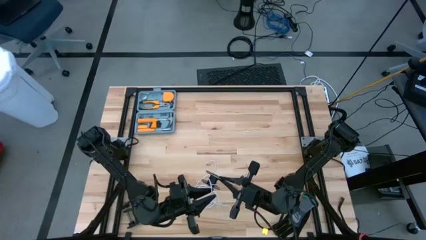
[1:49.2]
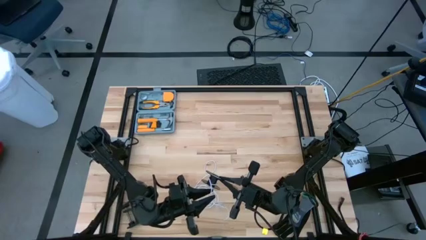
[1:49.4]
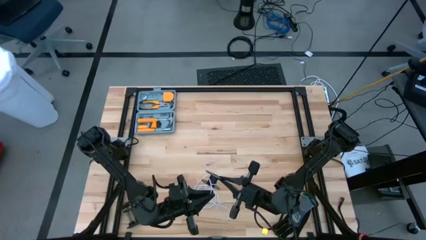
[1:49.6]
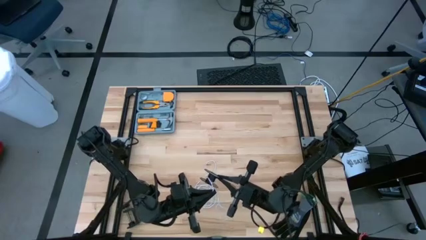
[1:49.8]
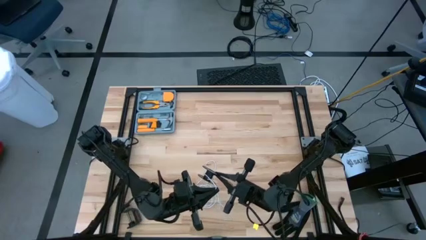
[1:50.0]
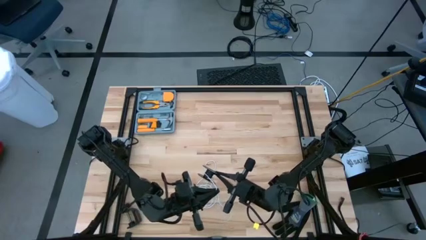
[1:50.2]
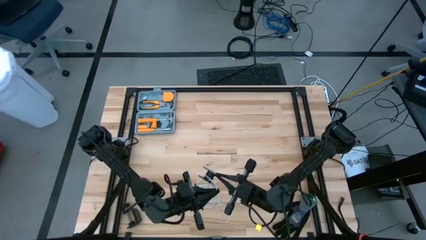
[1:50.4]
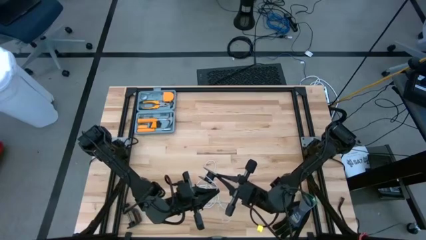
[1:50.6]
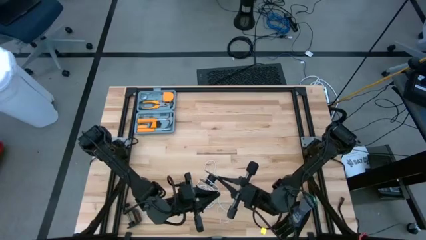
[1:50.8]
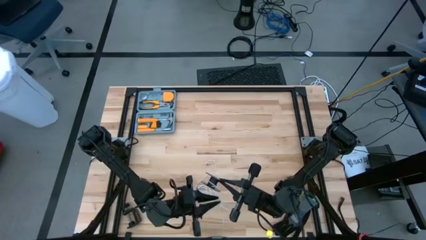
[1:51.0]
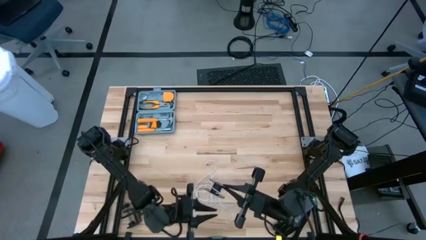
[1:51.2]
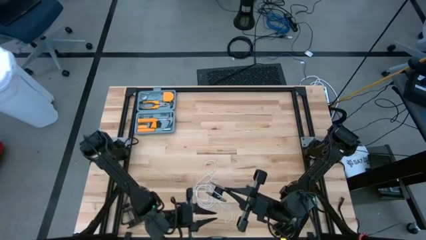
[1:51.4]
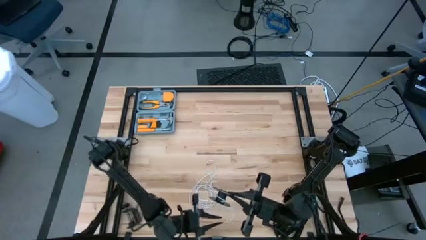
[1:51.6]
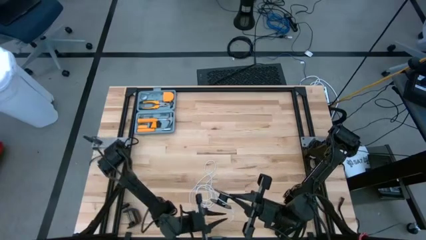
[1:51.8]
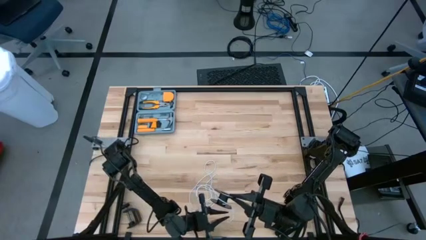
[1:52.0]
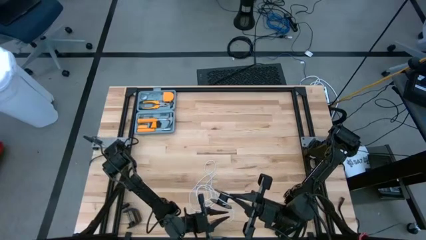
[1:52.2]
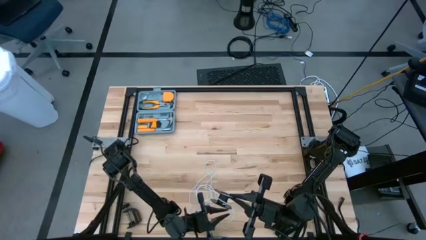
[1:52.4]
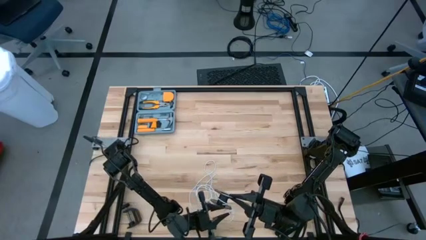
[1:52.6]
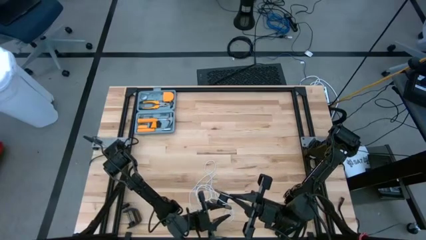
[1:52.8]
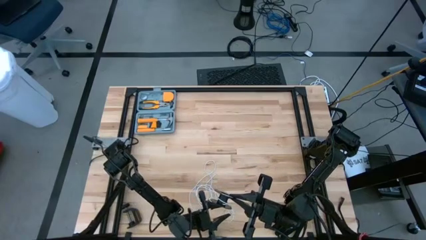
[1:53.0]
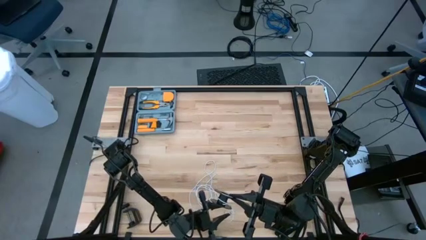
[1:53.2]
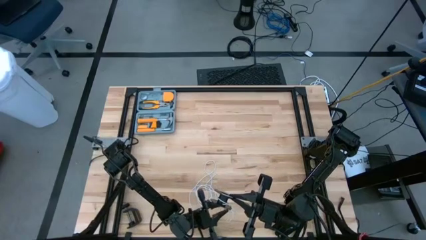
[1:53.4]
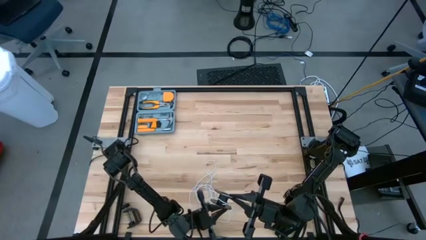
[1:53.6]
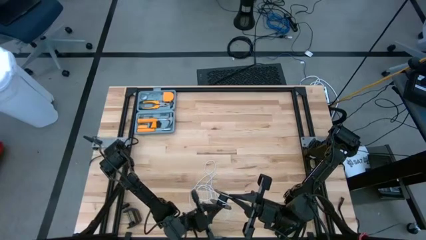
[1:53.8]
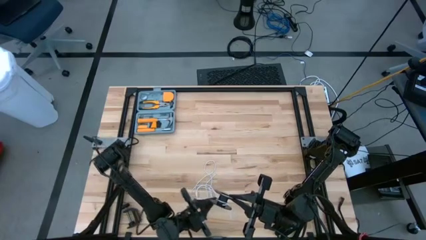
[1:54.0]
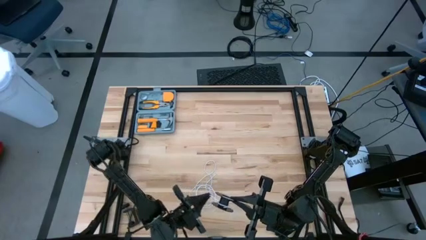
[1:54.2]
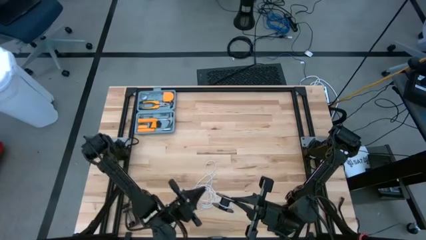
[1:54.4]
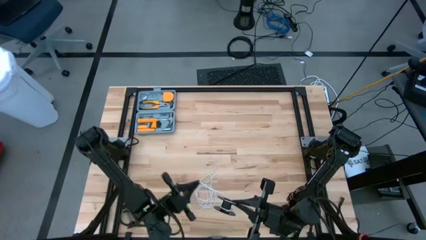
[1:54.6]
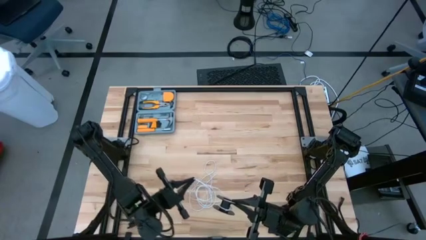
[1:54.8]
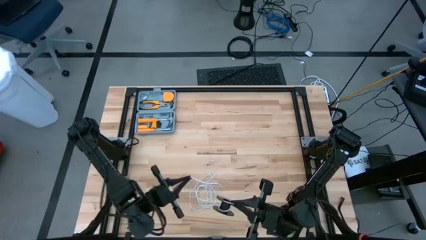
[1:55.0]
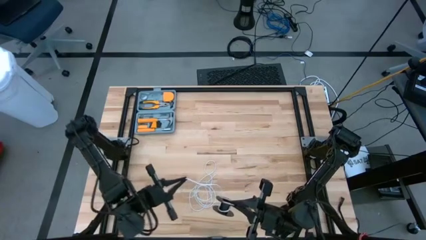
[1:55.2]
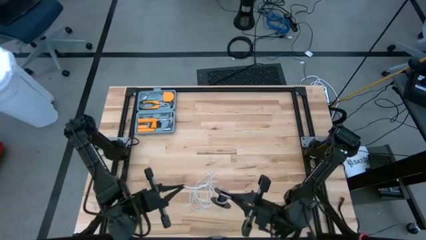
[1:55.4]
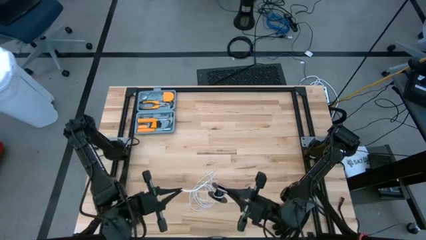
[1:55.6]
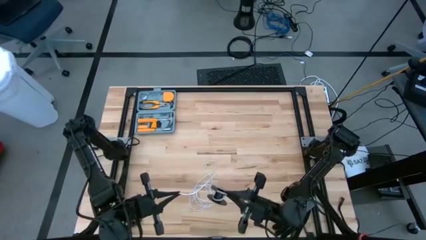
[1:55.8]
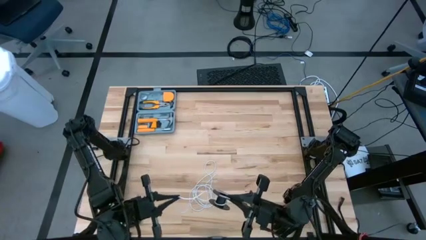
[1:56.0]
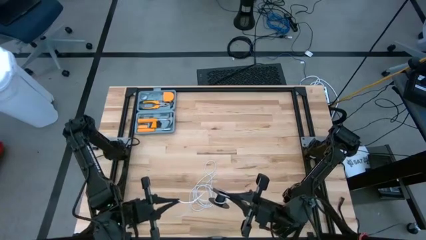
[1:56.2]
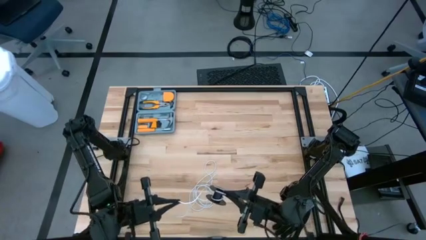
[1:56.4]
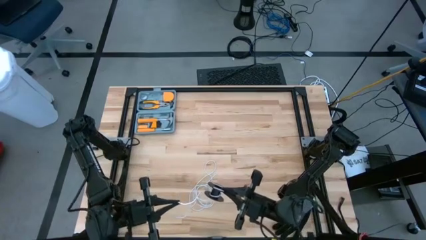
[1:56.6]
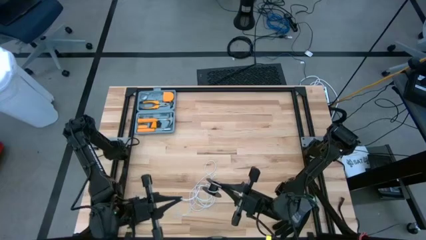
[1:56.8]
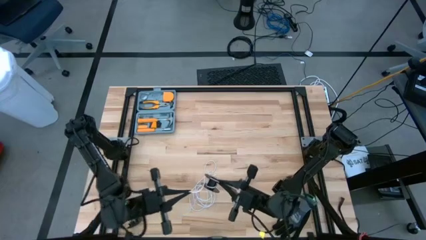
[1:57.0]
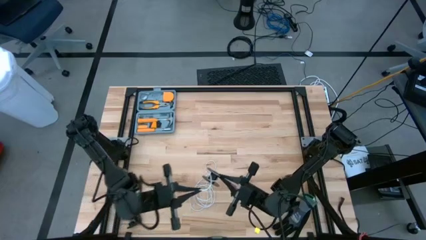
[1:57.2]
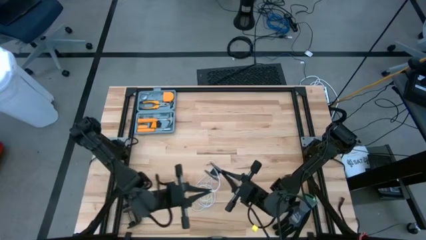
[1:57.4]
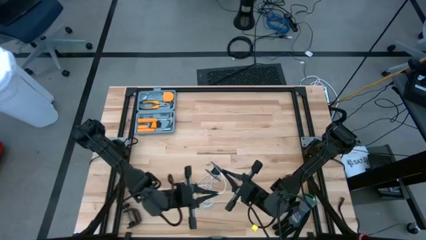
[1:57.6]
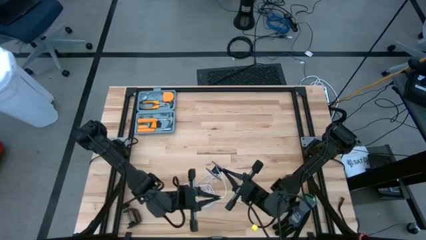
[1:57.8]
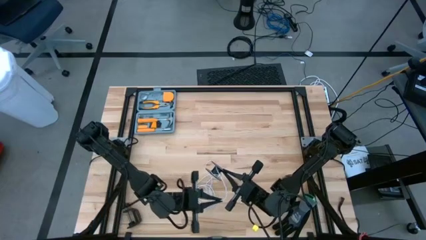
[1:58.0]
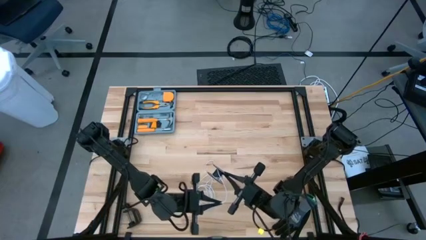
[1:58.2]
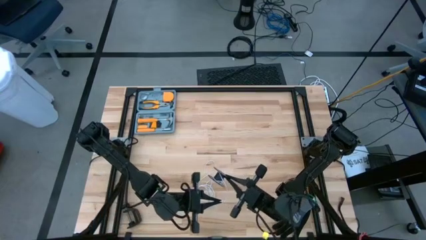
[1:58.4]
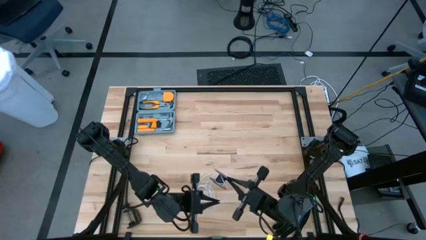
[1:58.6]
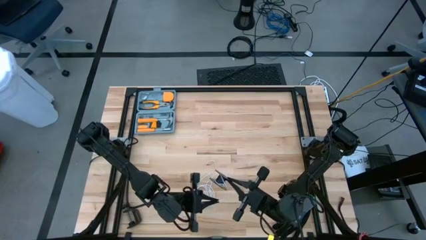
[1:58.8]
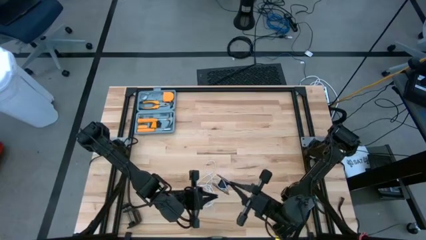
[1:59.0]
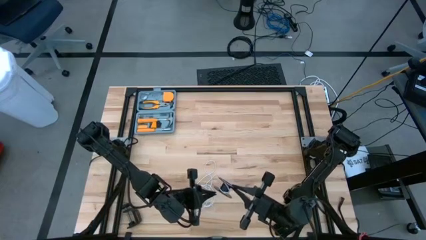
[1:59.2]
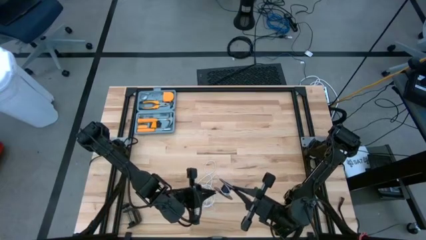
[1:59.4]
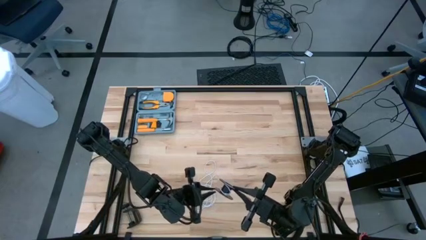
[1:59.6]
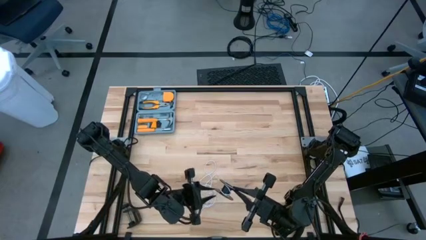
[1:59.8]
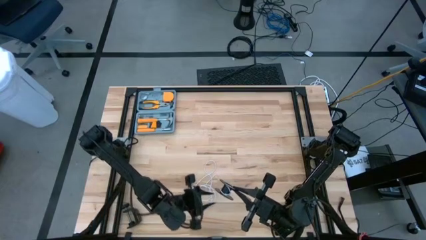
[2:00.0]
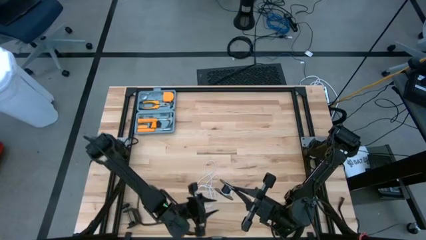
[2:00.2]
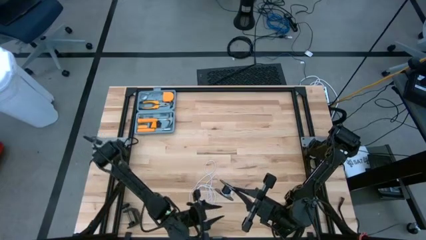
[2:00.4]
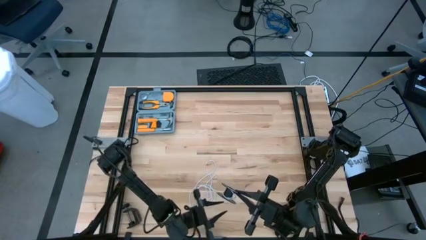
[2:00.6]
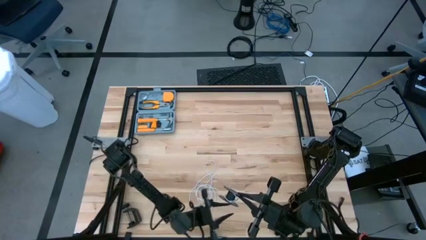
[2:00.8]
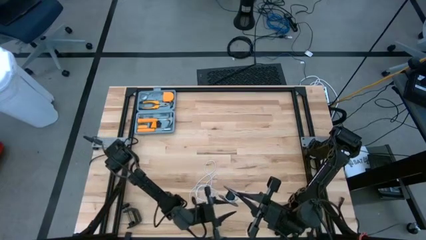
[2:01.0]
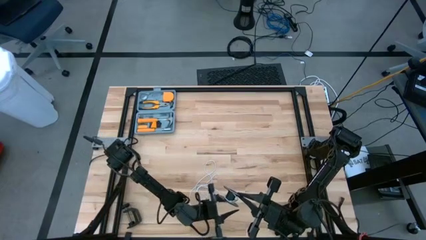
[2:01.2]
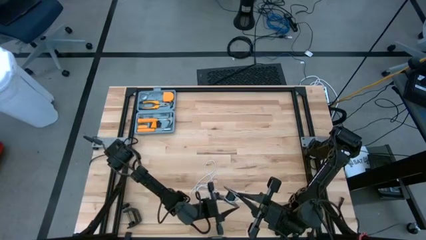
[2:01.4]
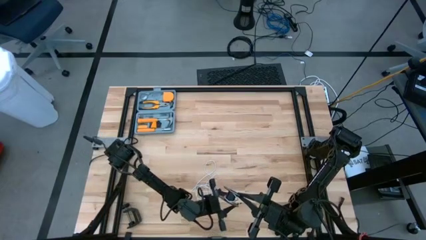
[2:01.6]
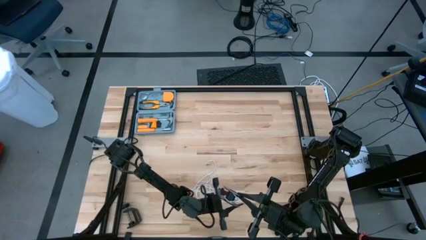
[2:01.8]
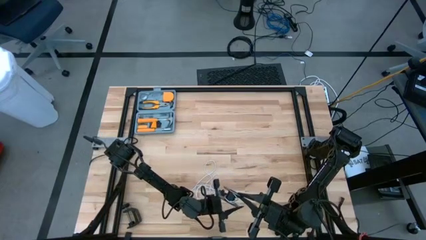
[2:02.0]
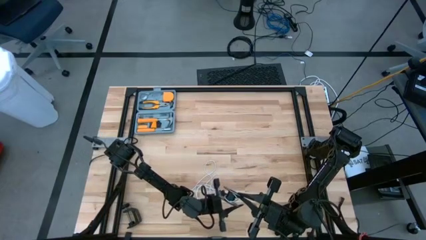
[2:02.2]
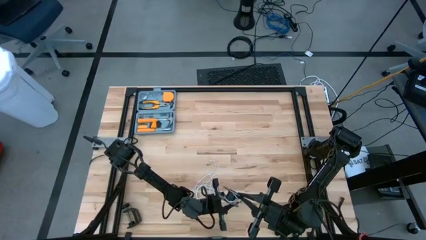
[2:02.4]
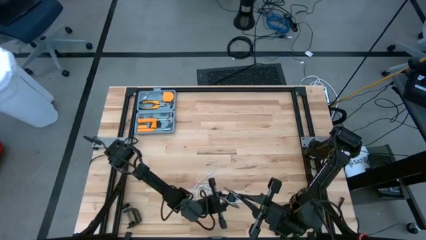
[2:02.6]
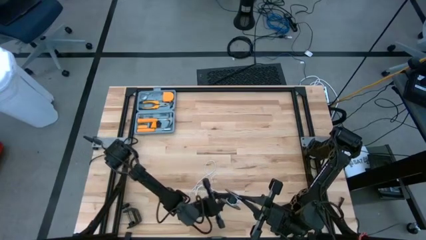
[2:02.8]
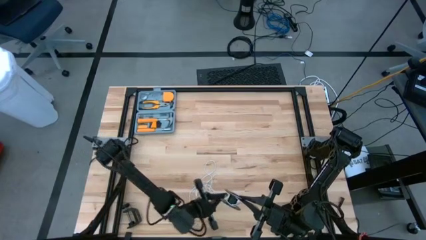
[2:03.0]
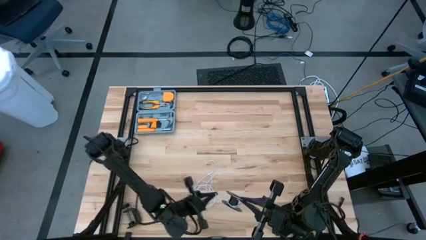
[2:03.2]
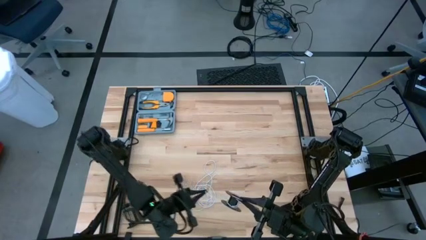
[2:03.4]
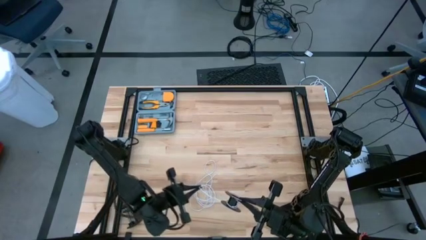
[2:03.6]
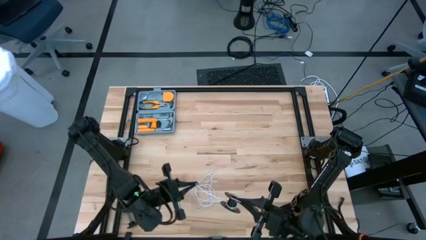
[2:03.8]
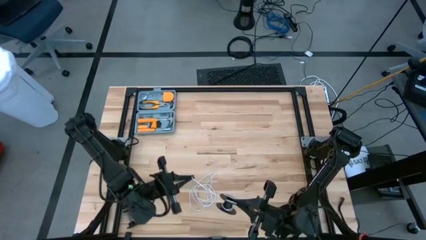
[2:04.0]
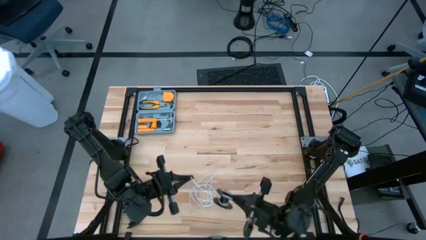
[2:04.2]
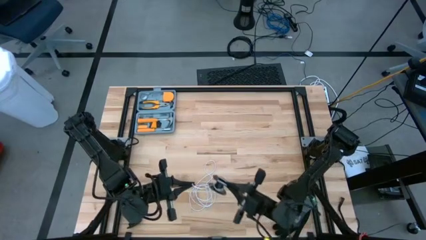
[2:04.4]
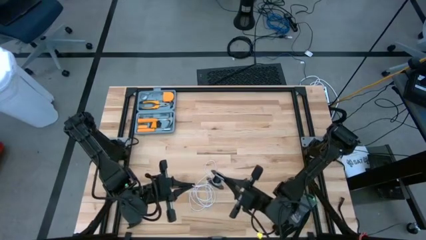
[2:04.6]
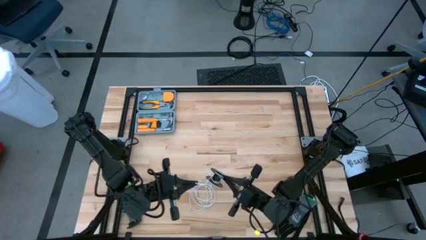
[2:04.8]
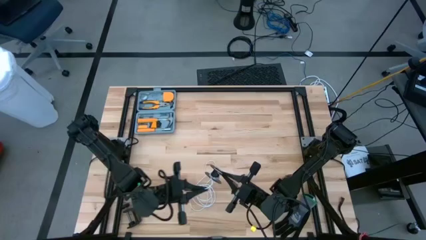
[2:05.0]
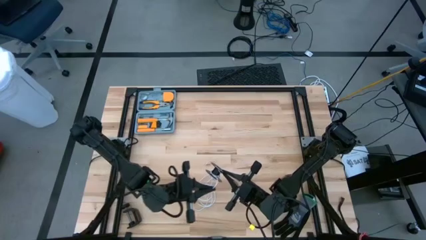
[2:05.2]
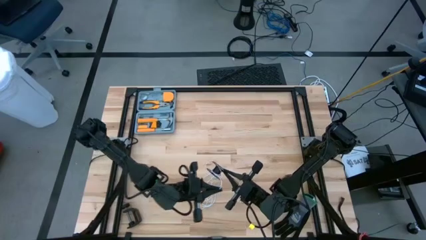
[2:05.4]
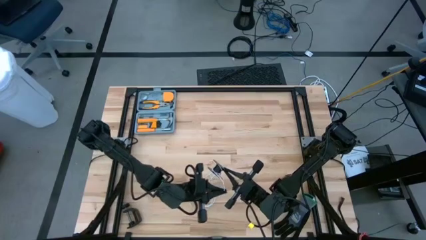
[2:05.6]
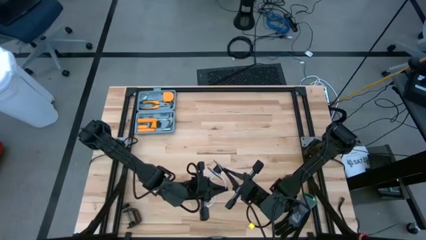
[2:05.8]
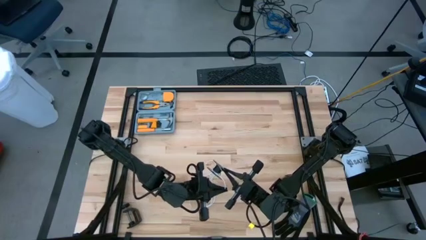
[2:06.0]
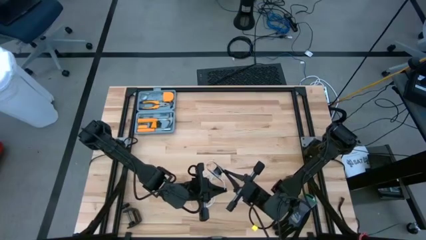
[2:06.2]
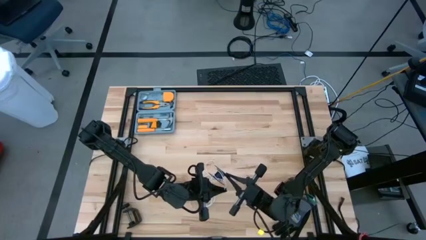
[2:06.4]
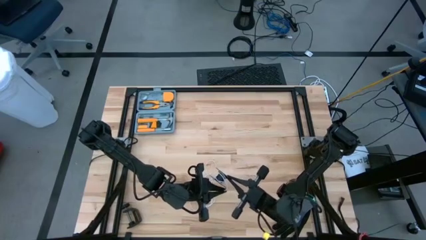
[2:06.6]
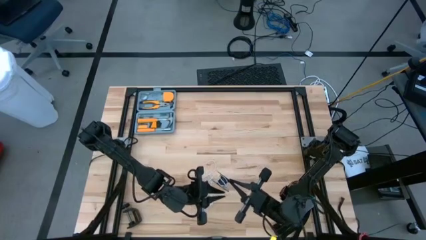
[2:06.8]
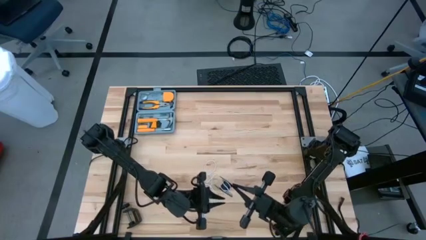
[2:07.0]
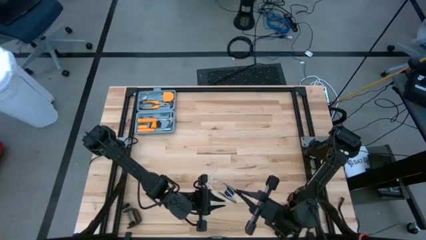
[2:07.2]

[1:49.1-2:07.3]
Task: Coil cords
Coil the white wire on the spool
